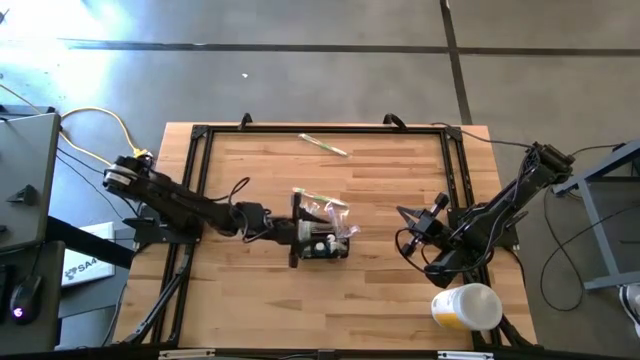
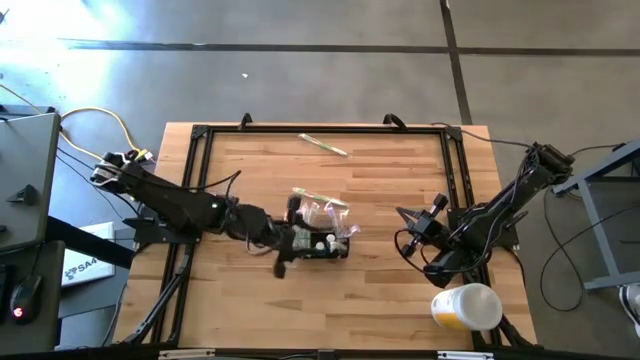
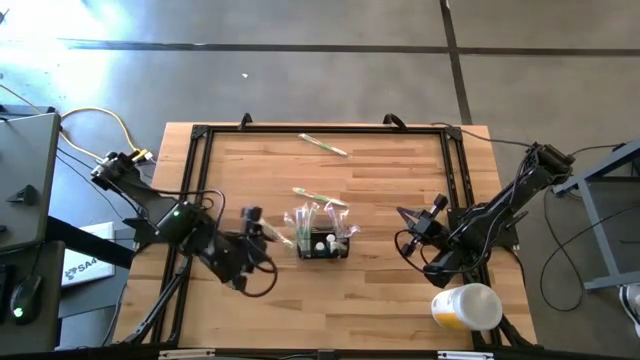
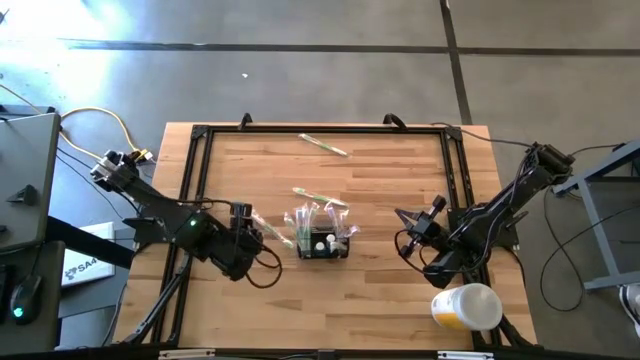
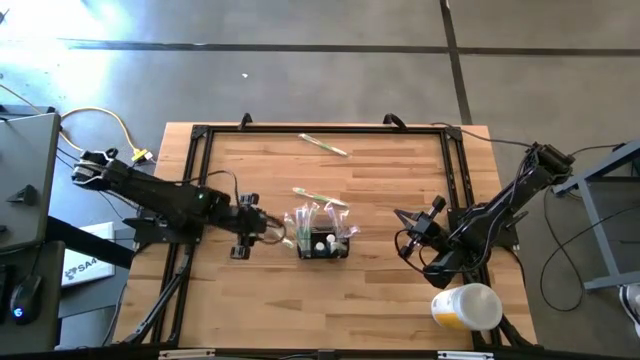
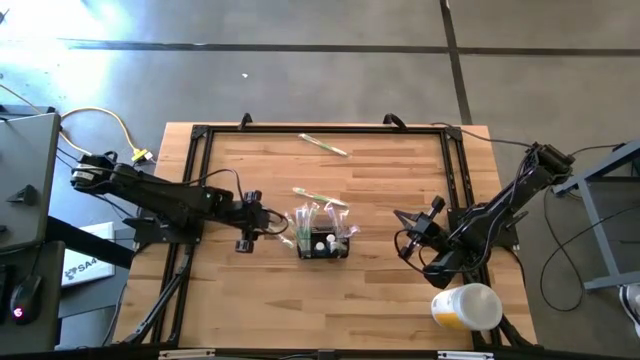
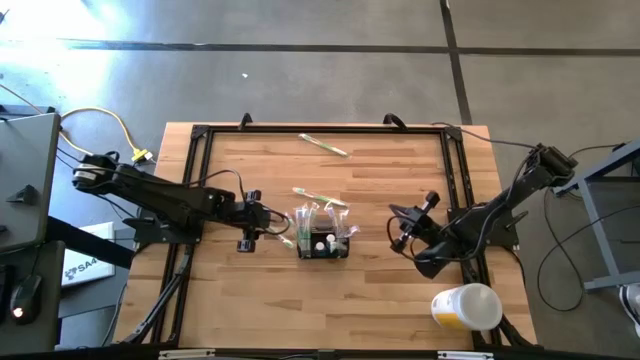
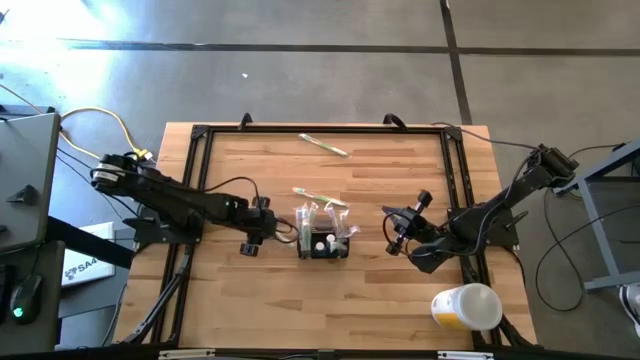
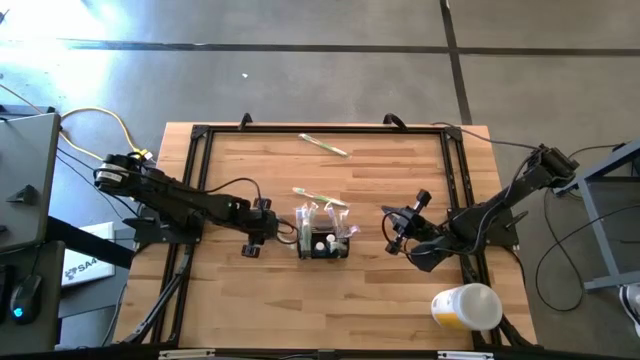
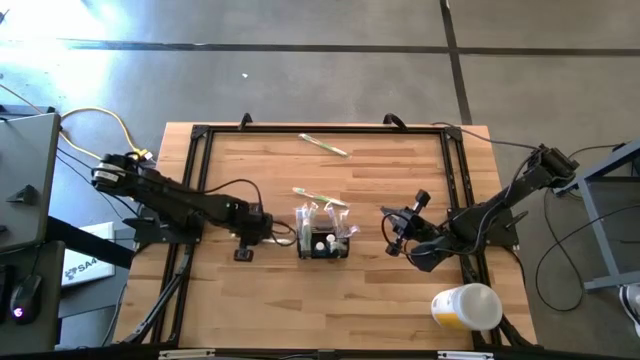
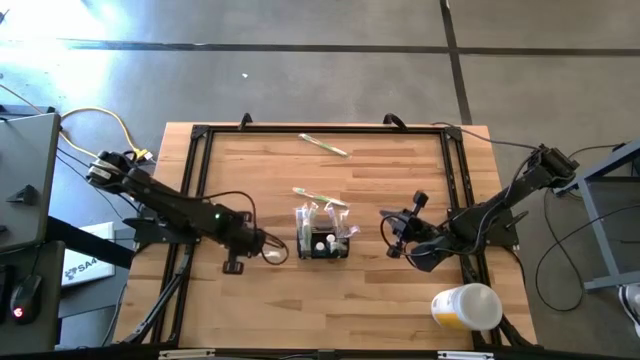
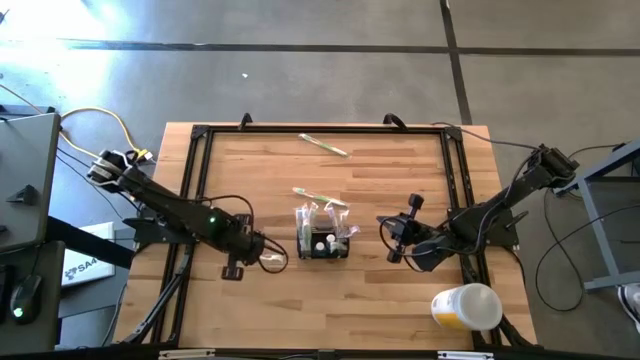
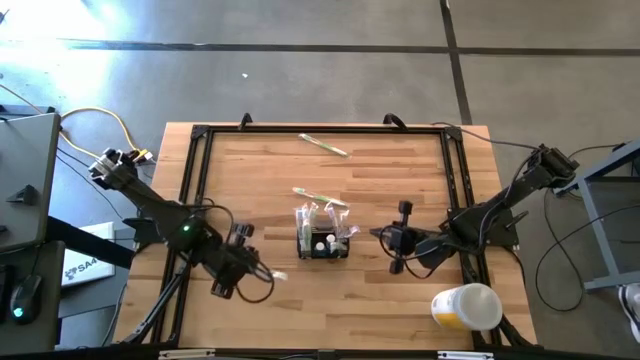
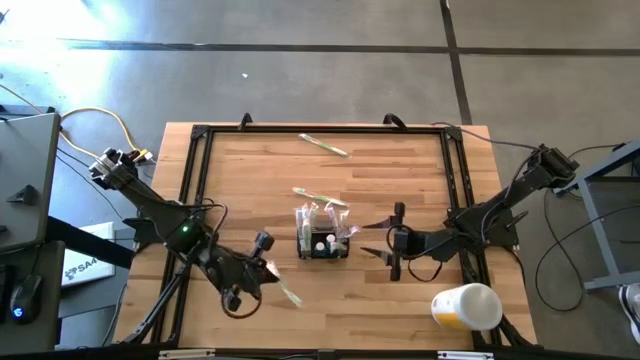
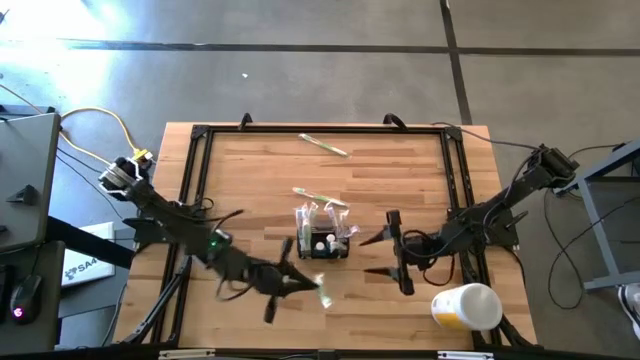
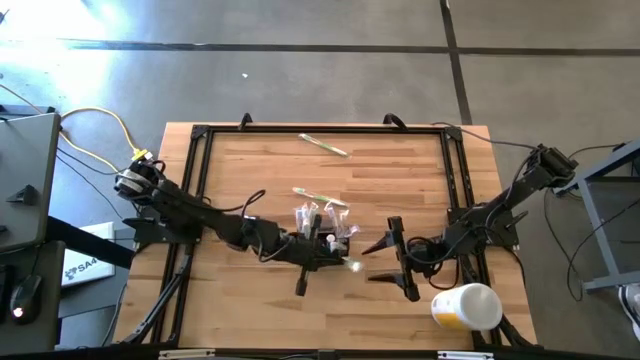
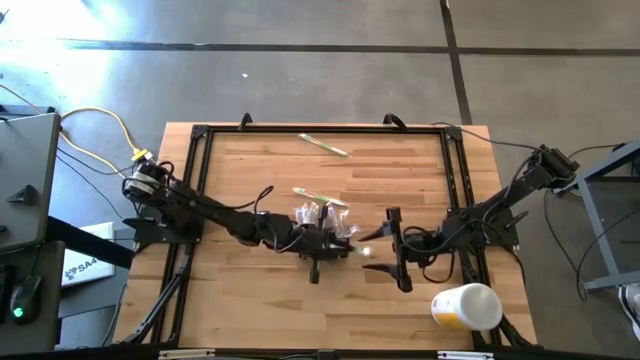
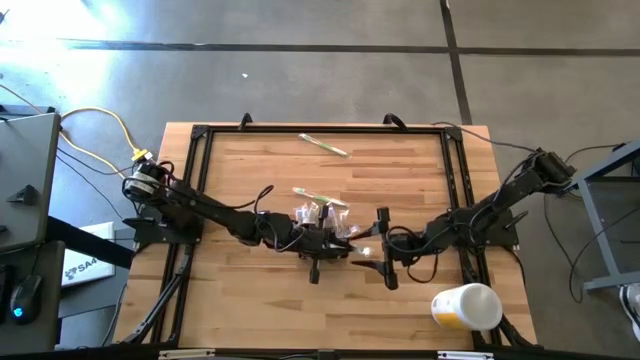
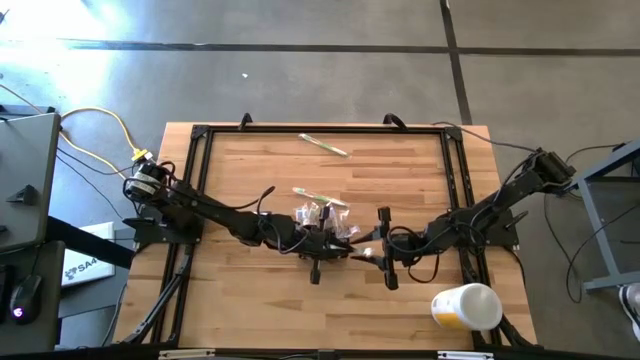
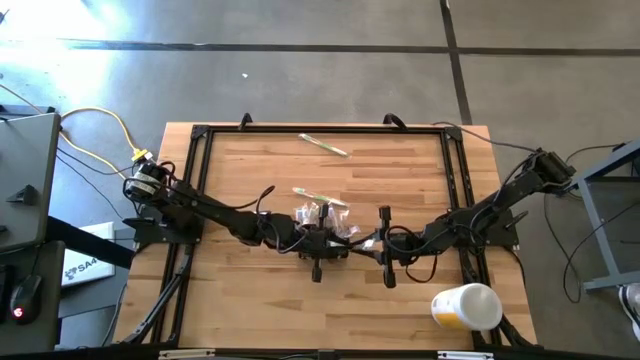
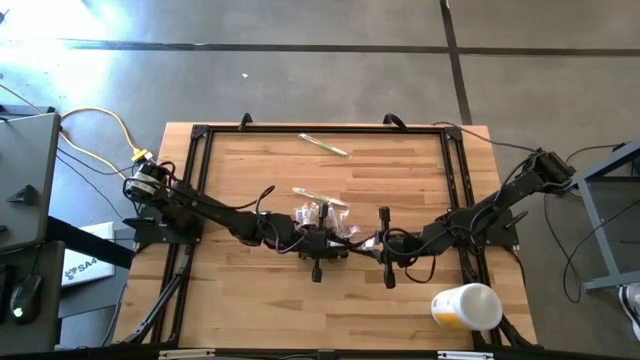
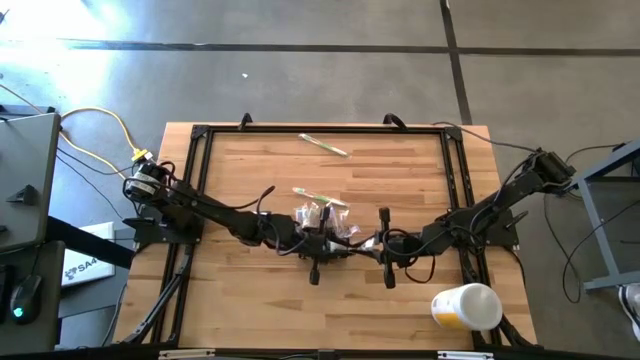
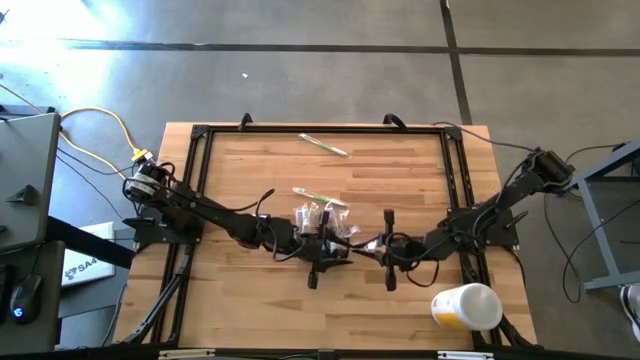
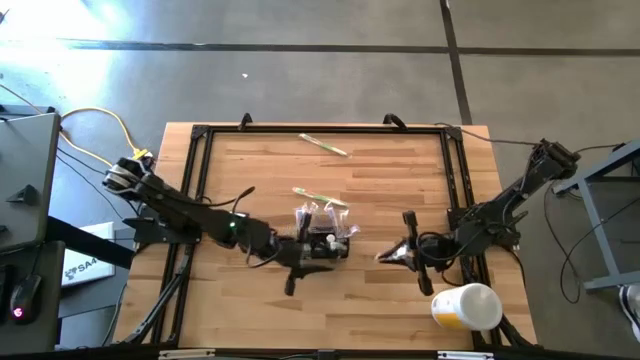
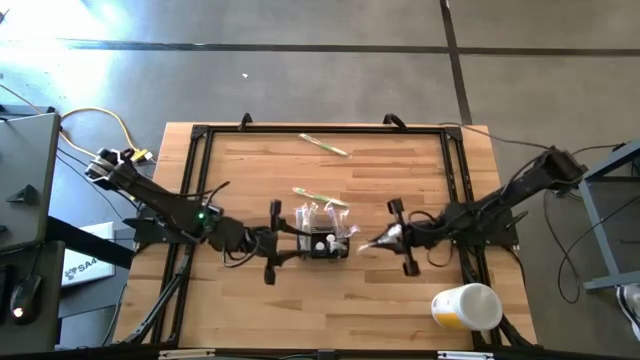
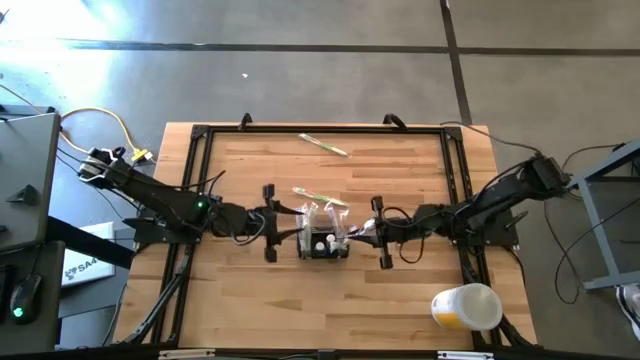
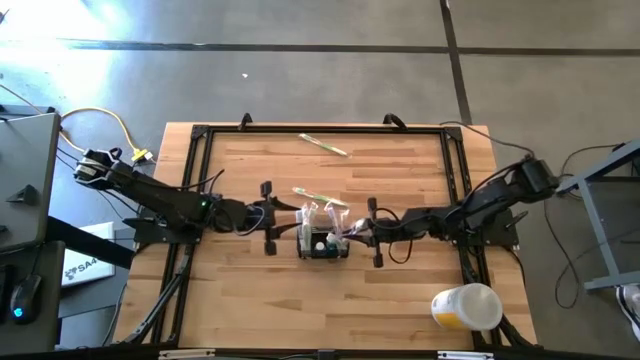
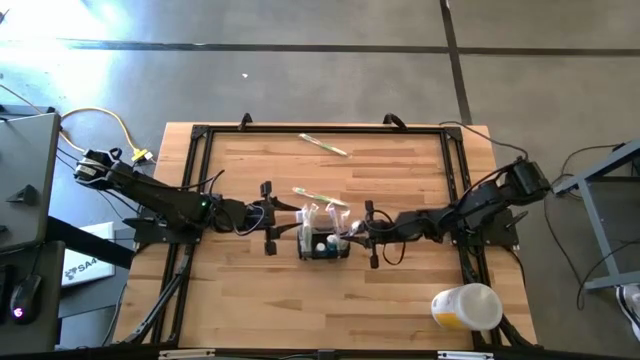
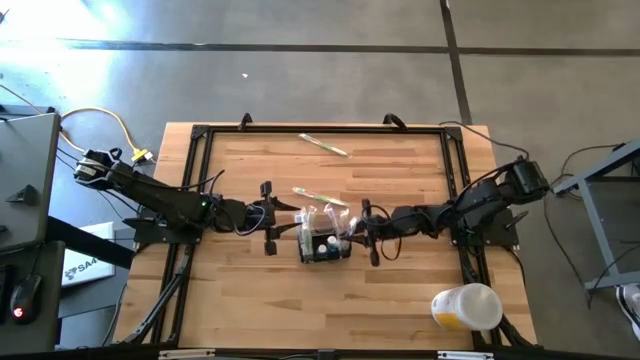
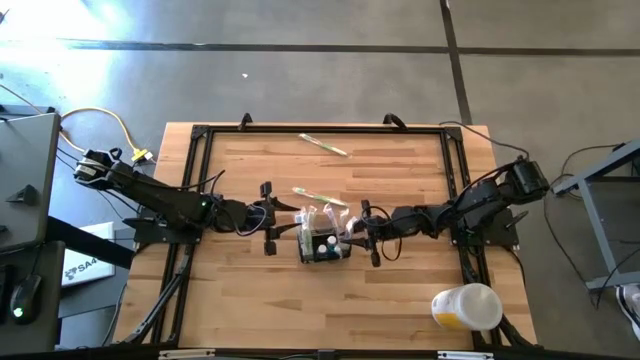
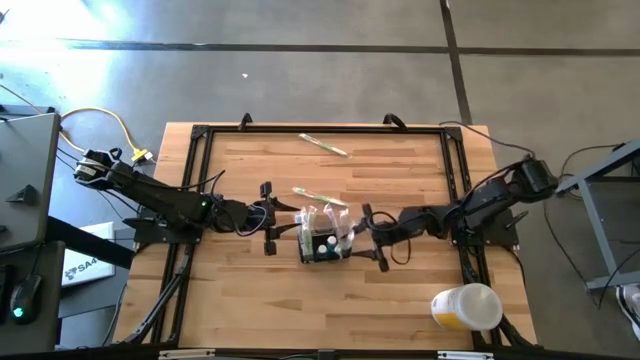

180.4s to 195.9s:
Task: Pick & Place toothbrushing station
Put the green toothbrush into the wire organizer

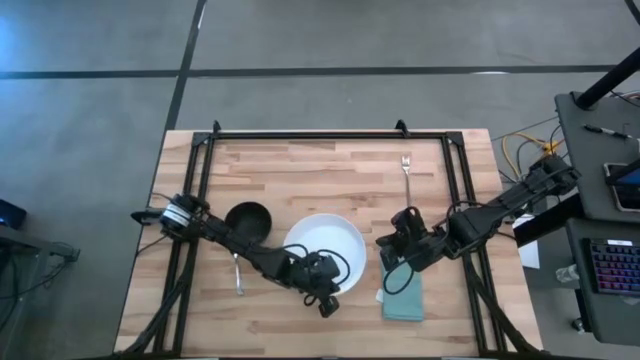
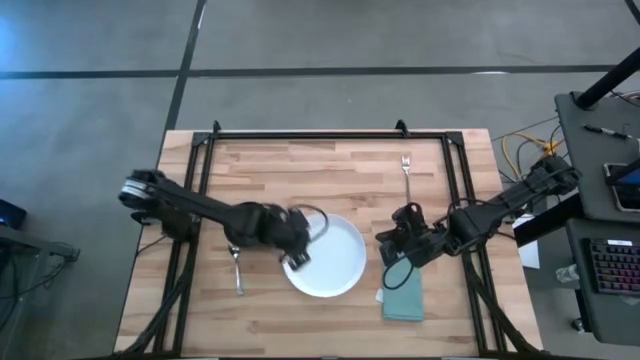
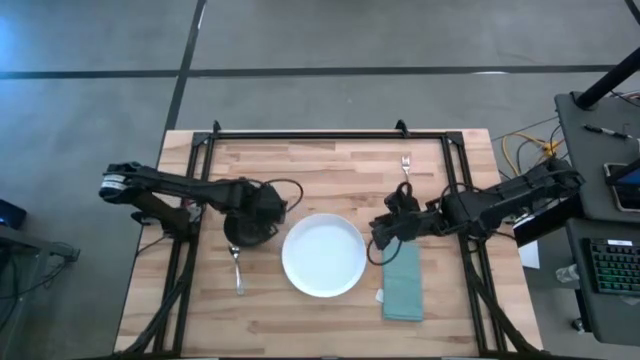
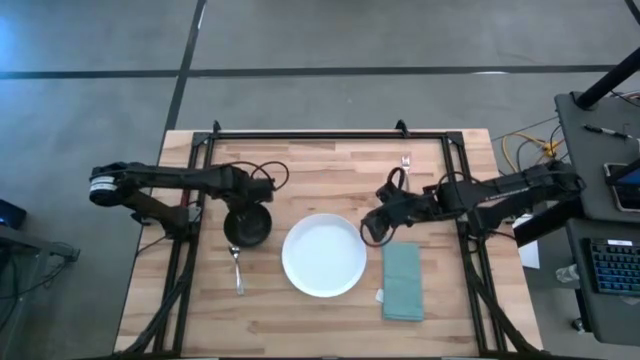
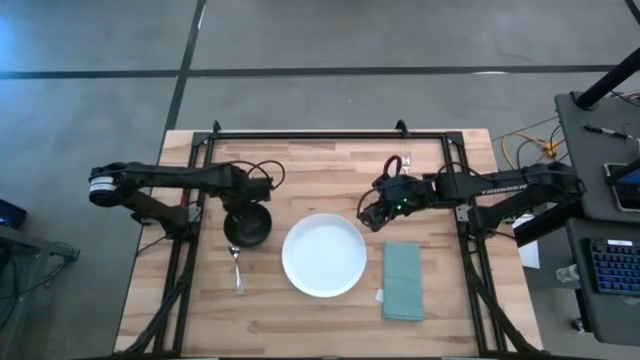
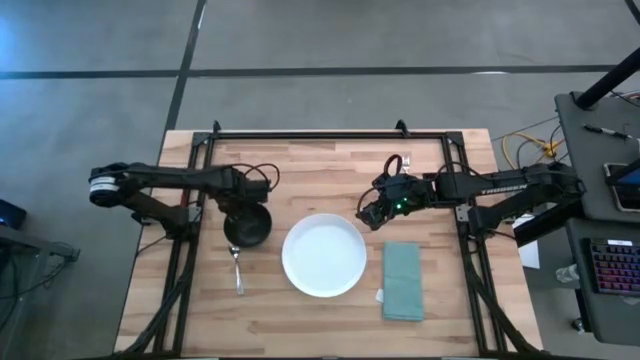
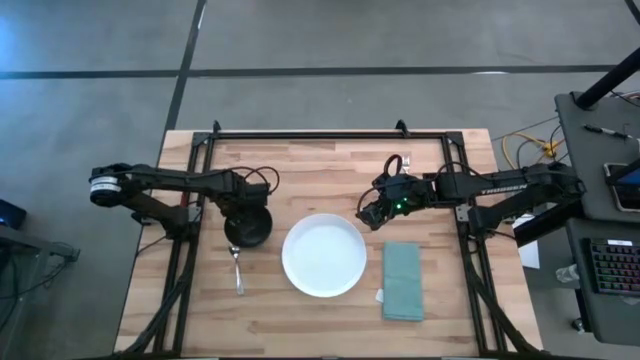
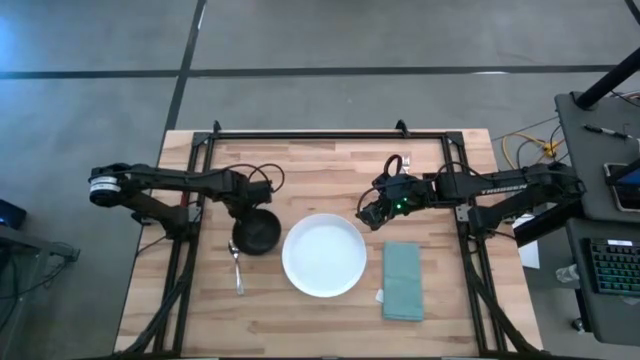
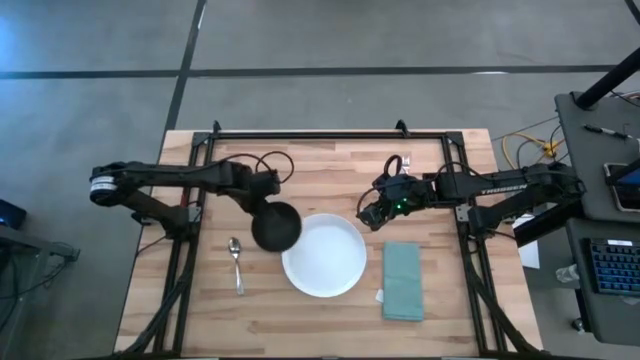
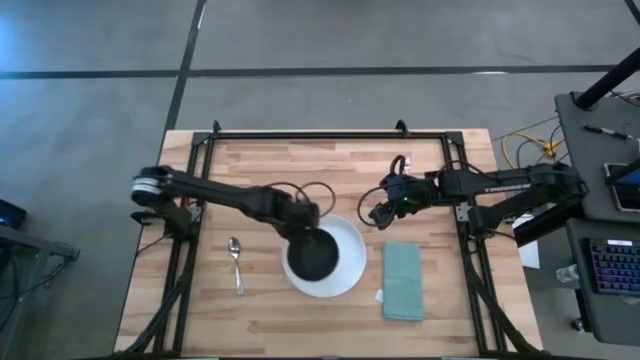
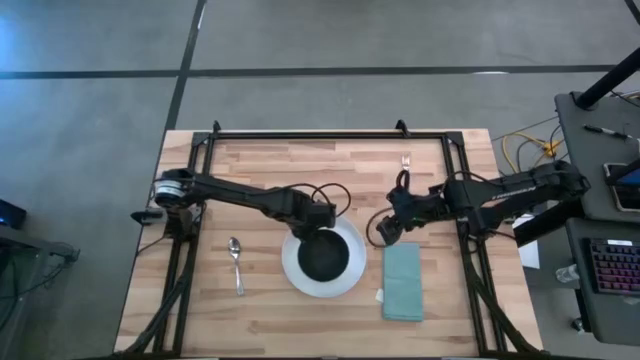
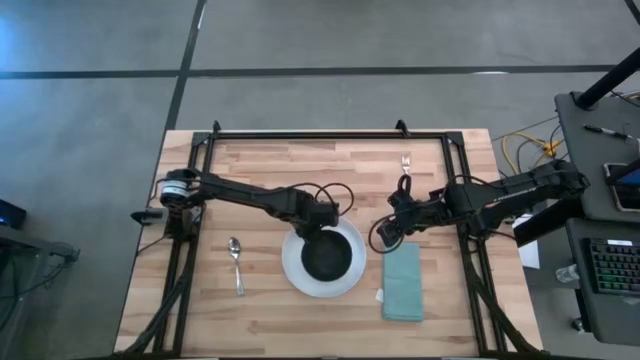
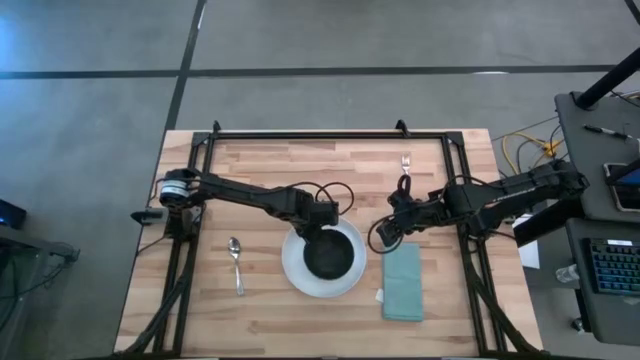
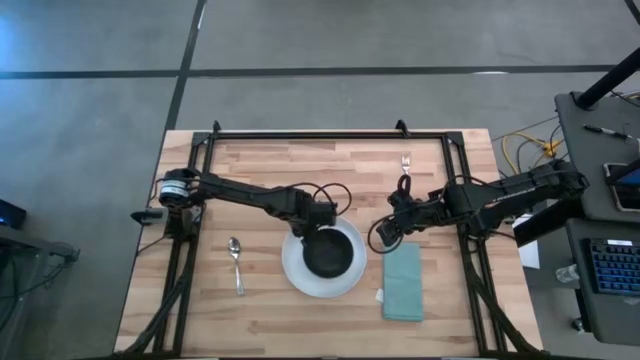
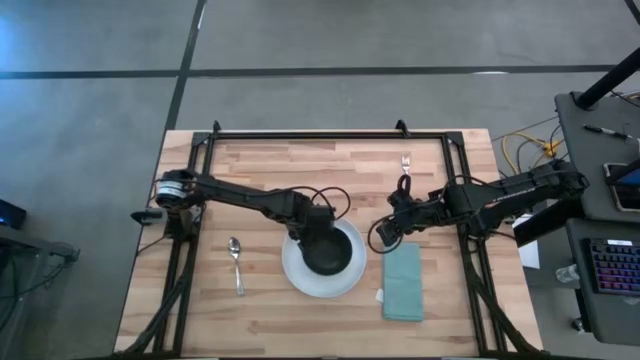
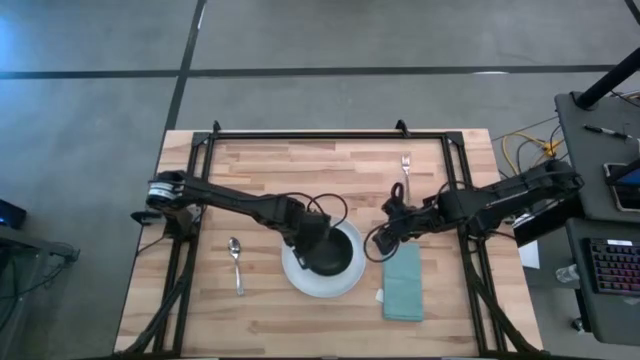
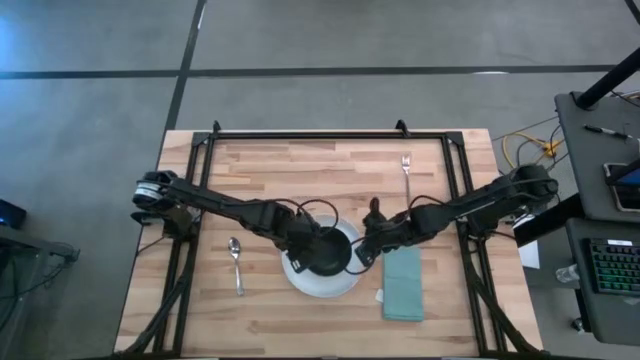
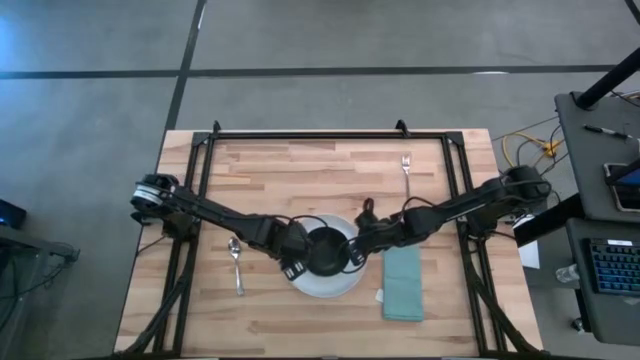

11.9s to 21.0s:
Task: Set table place
Put the black bowl on top of the white plate
